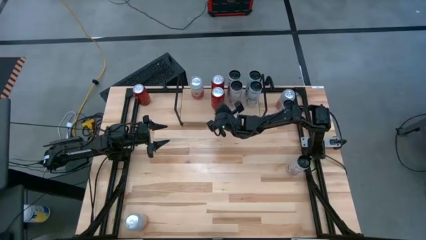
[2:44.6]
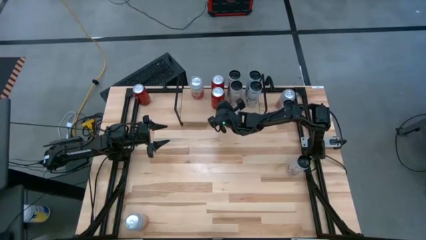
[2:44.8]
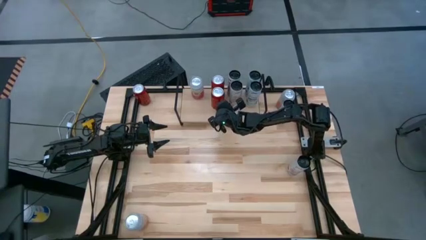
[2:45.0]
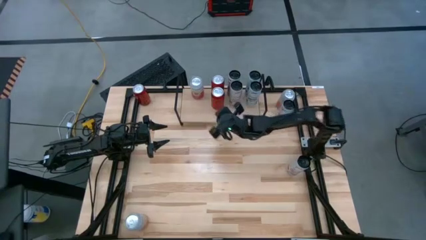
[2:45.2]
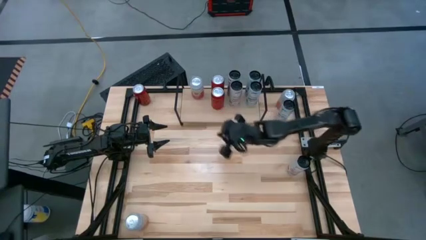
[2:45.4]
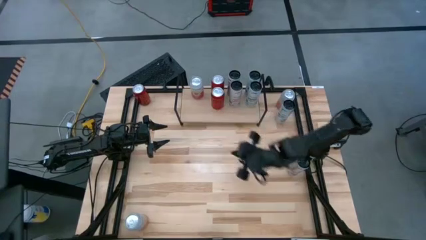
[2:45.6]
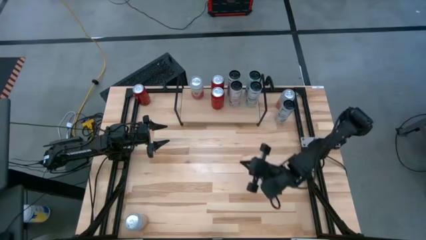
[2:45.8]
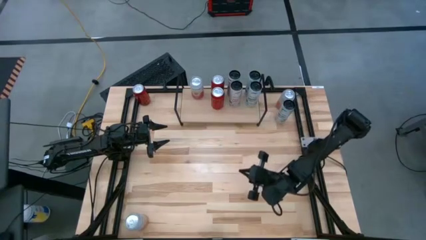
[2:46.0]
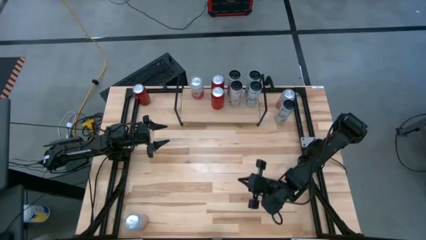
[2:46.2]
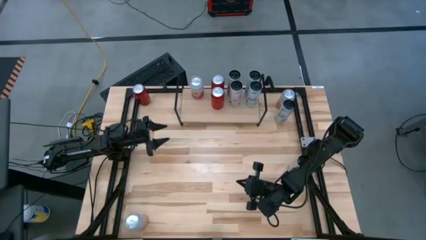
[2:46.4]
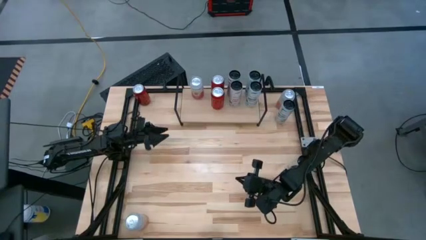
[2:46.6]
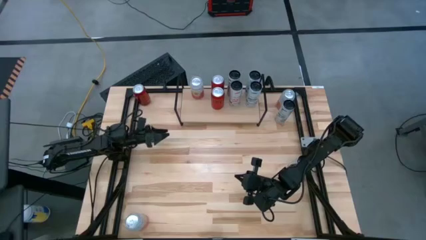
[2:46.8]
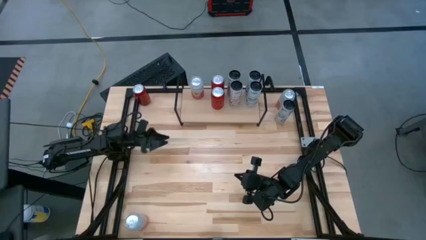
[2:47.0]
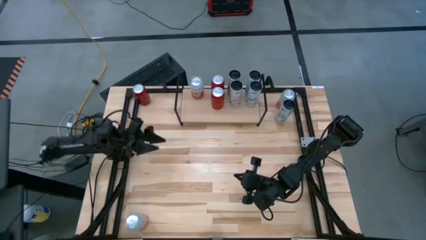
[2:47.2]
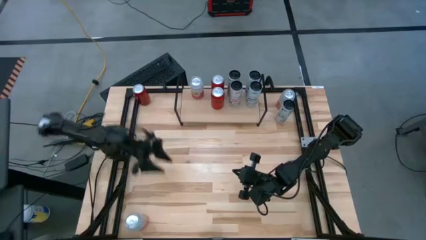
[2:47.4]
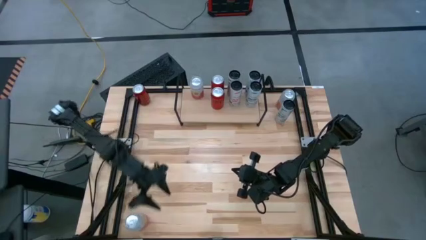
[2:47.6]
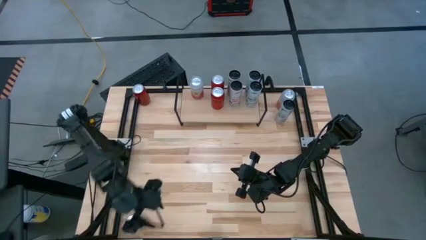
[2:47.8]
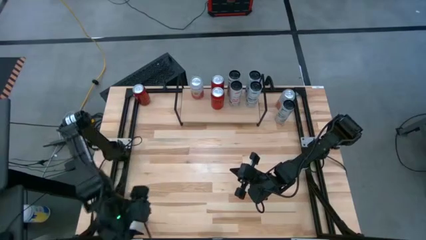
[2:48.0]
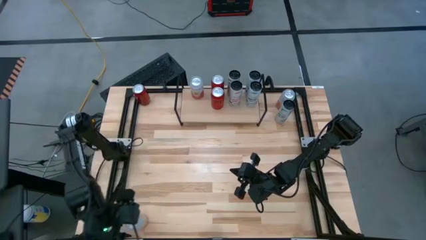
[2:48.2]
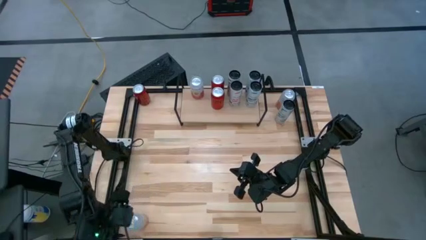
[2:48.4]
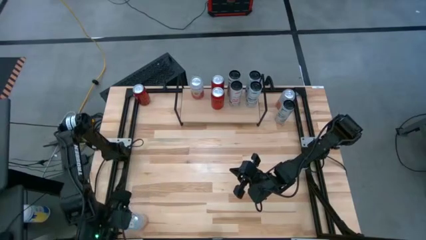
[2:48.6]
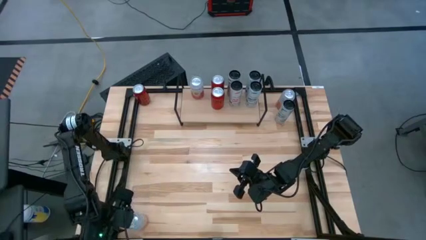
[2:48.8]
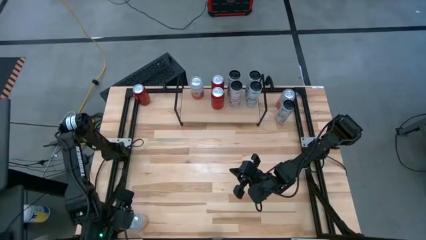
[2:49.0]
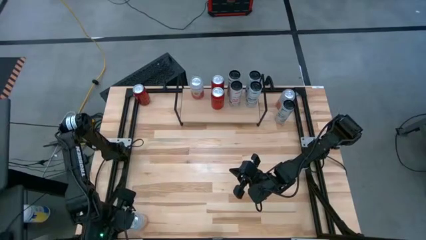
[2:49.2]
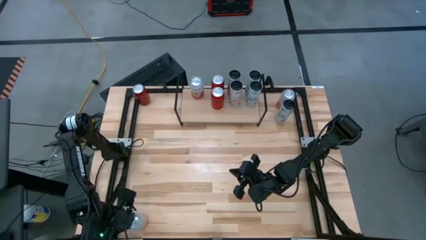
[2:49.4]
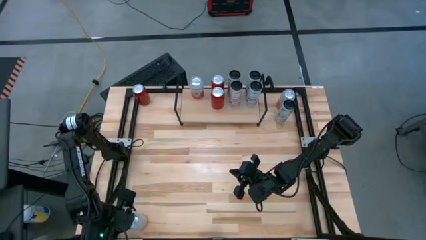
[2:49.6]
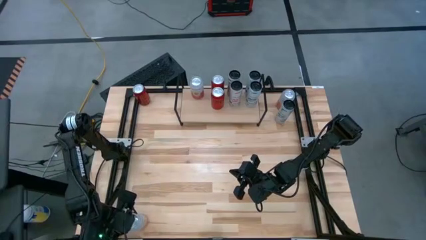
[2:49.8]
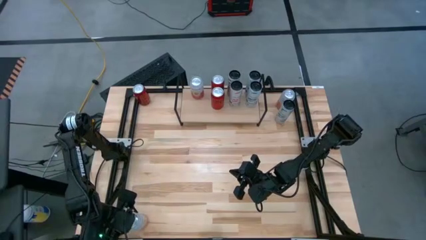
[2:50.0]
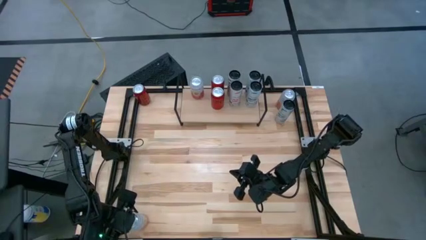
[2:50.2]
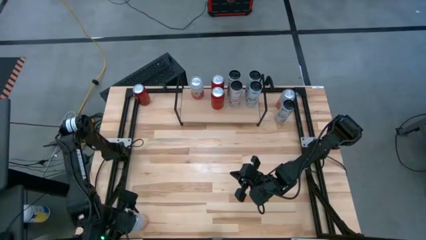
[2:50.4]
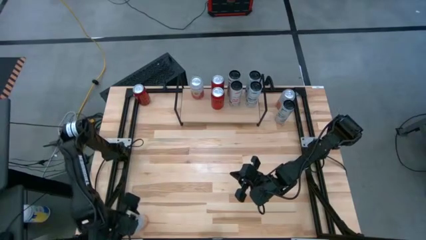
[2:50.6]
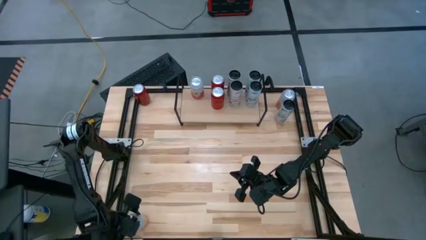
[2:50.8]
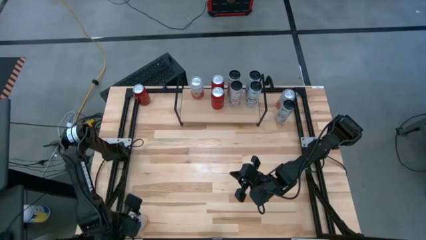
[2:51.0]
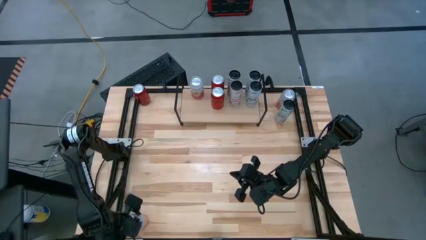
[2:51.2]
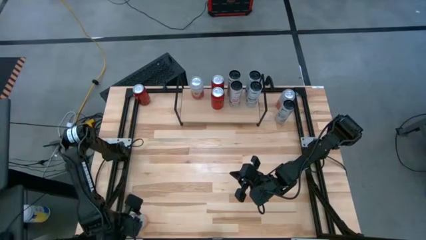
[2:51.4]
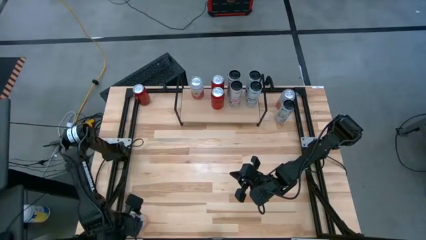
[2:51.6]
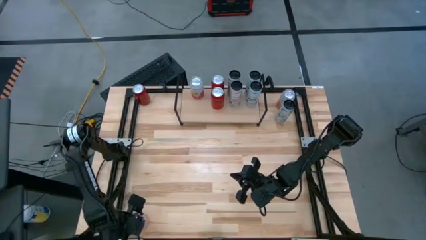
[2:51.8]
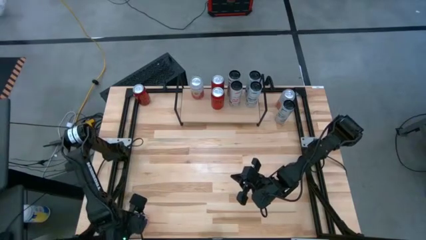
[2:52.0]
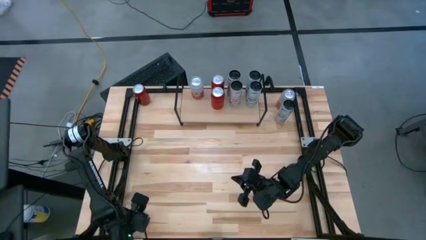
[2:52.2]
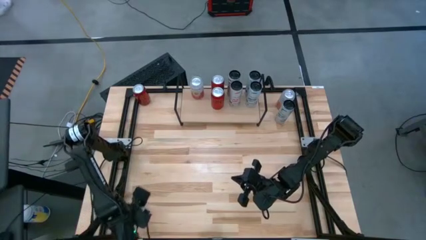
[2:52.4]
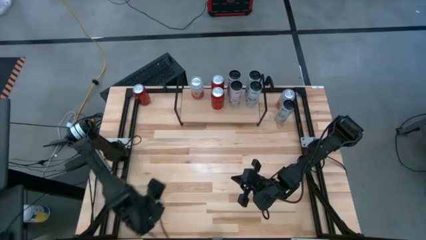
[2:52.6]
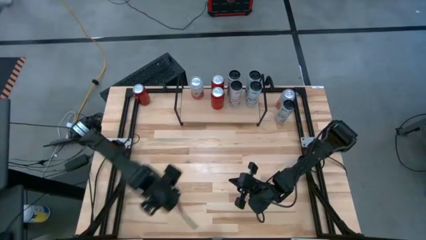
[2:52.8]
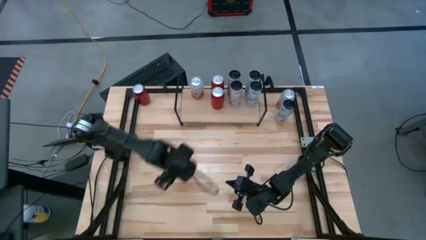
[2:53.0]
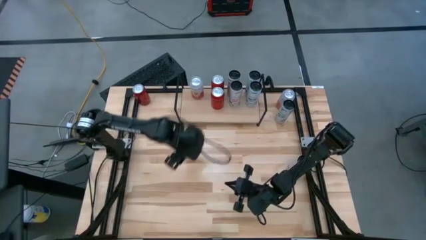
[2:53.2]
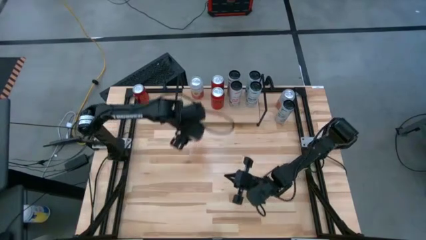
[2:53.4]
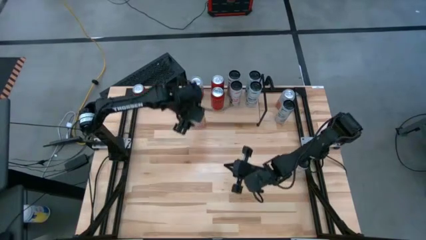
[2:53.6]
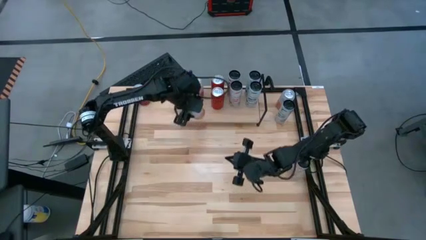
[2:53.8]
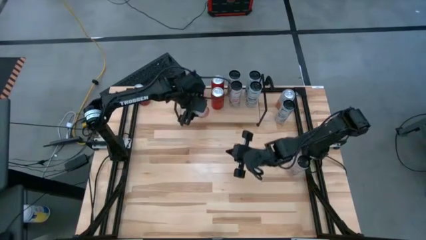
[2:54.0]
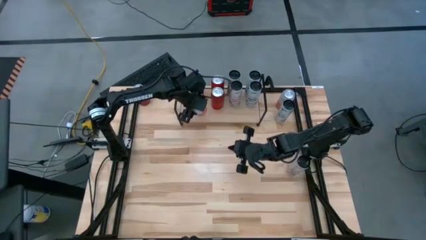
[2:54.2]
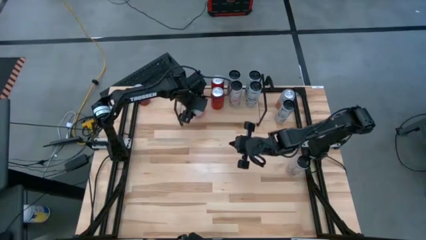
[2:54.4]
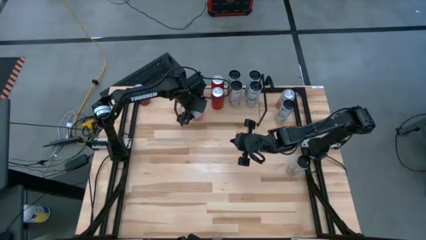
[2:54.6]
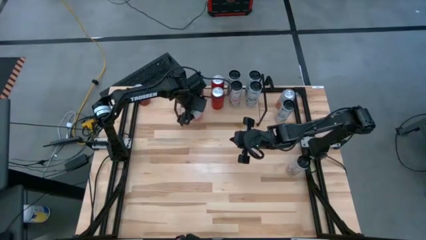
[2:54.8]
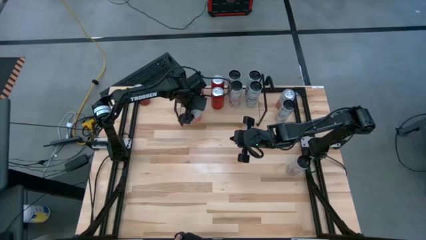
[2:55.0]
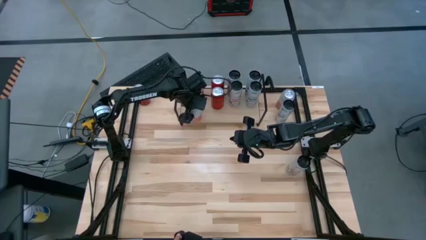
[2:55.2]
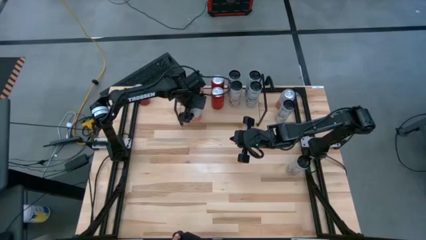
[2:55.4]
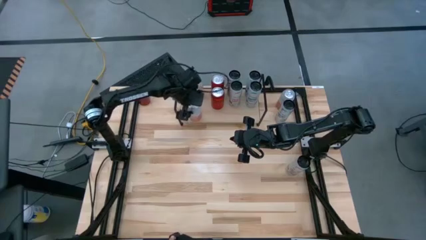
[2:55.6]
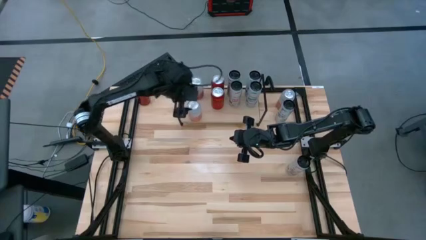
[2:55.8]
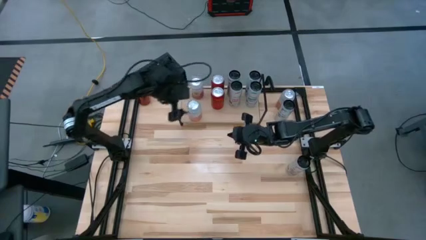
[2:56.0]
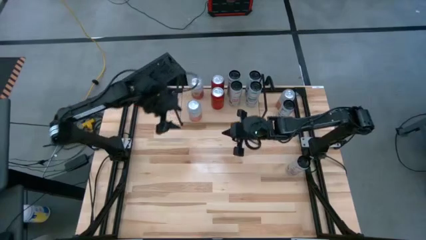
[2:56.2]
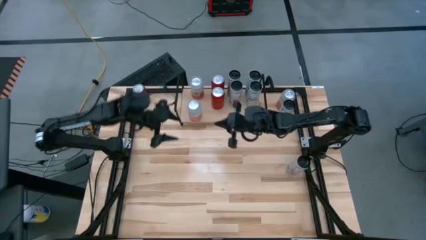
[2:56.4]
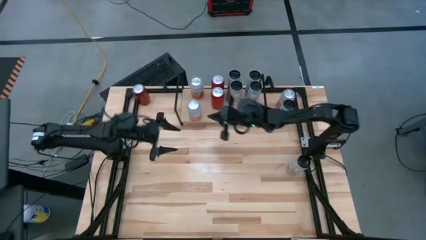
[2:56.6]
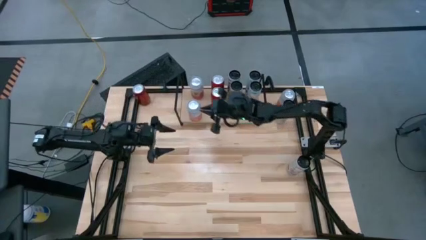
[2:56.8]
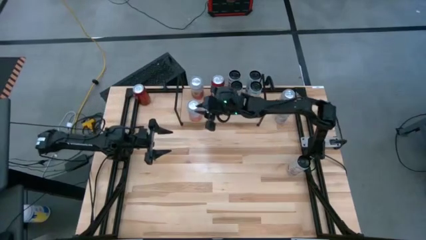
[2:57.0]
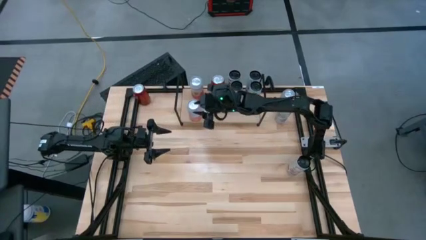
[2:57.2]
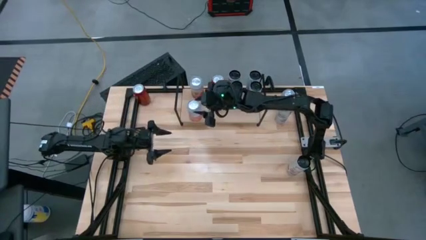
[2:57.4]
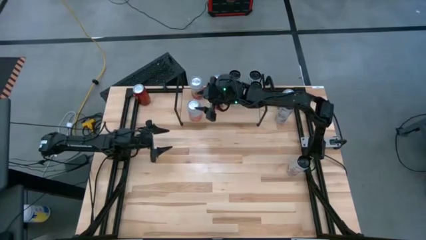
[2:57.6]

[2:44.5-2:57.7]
Task: Place canned beverage on shelf
Put the bottom orange white soda can on the shelf aligned with the pink white soda can

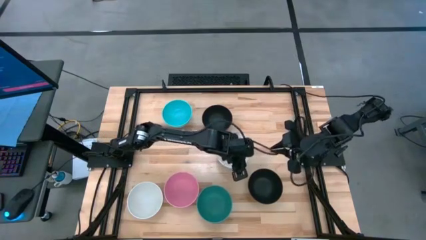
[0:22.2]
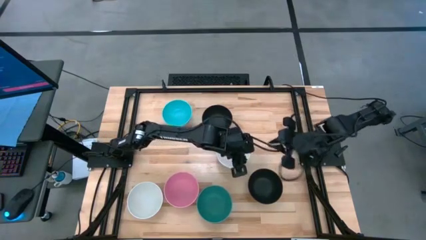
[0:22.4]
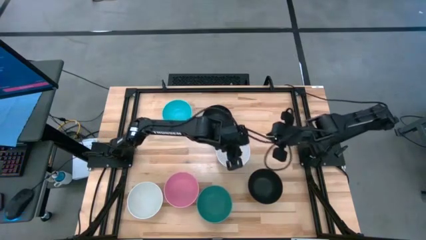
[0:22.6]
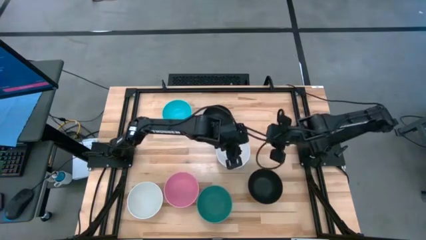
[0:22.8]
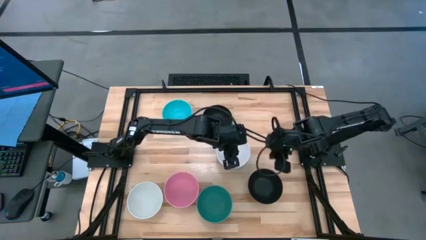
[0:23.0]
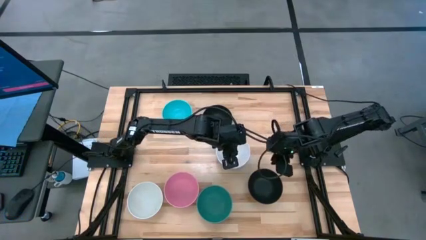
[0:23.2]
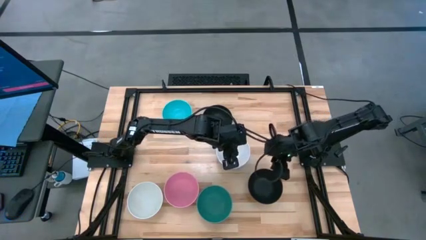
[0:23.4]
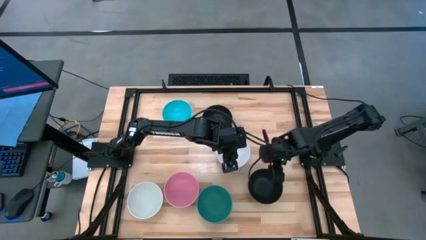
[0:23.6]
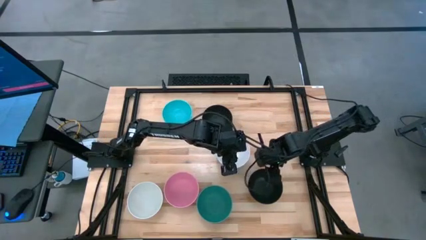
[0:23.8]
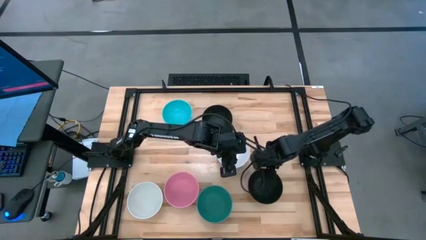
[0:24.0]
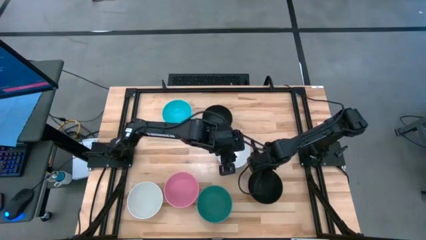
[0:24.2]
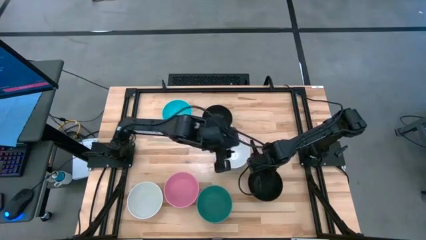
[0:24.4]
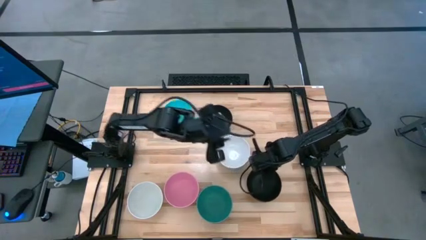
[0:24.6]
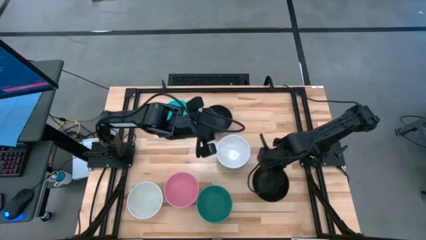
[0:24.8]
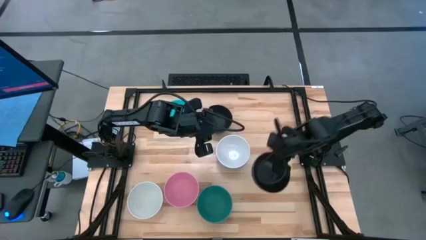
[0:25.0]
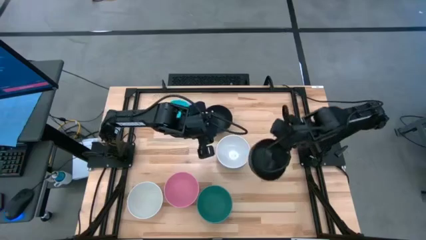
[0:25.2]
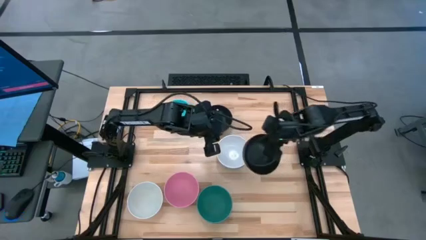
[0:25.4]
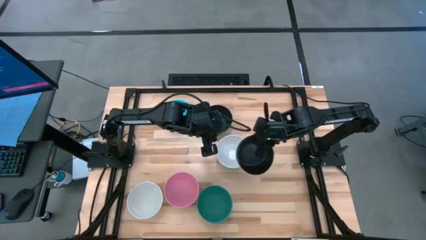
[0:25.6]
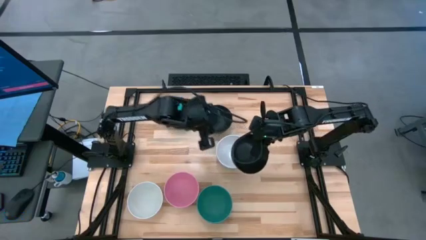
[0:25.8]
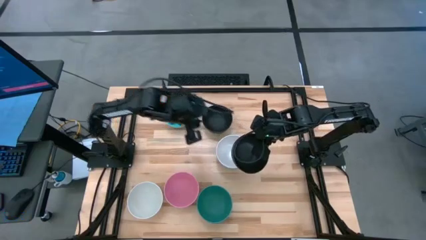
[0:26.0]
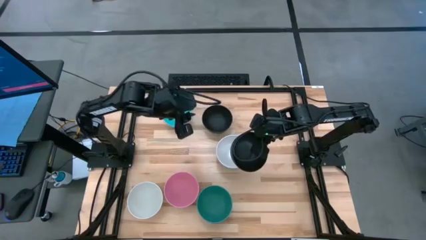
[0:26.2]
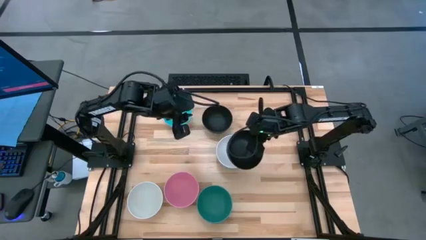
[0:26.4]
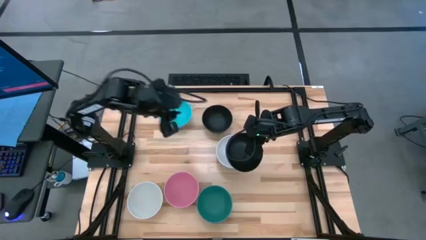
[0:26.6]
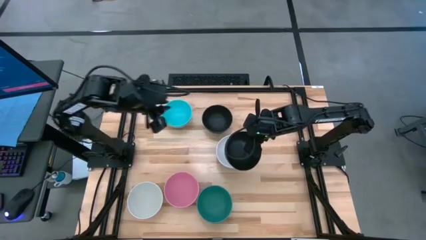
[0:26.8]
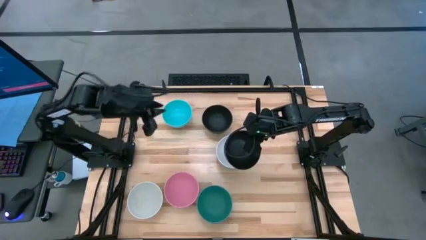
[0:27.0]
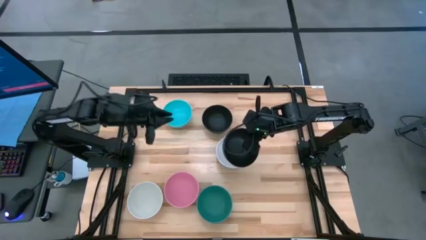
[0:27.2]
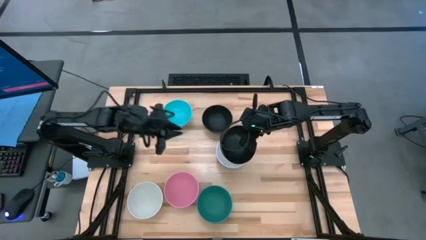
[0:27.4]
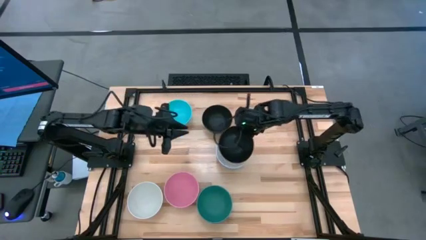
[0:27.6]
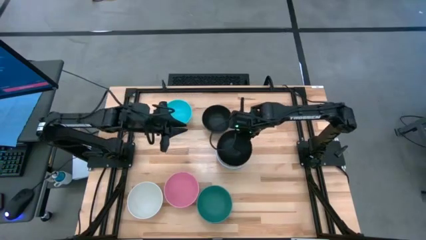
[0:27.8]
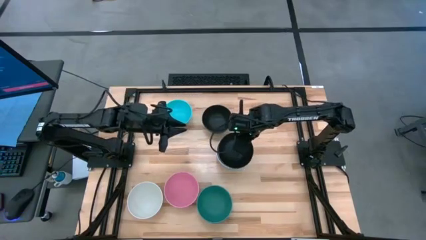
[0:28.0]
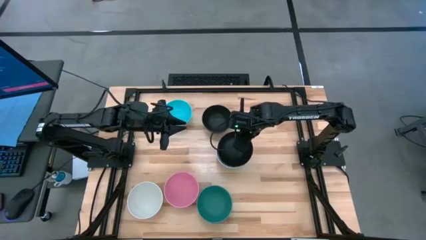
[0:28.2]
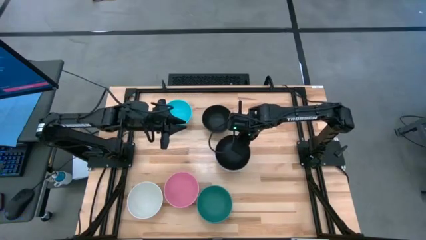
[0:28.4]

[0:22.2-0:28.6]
Task: Nest bowls inside each other
Stack the bottom black bowl on top of the white bowl
